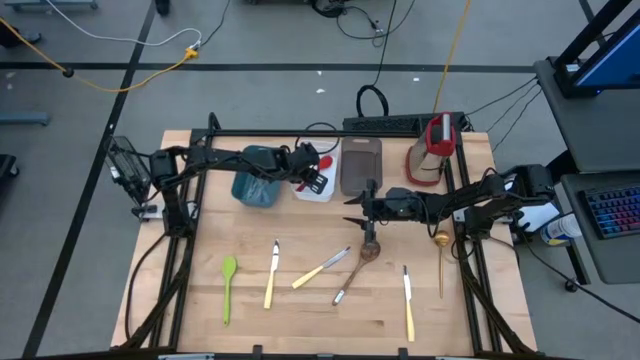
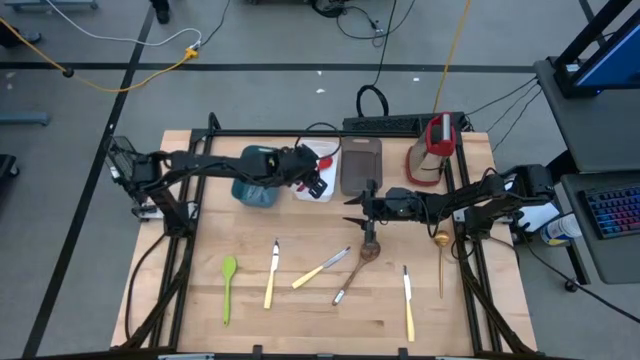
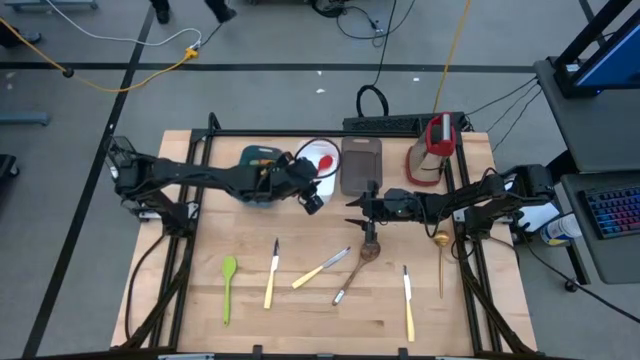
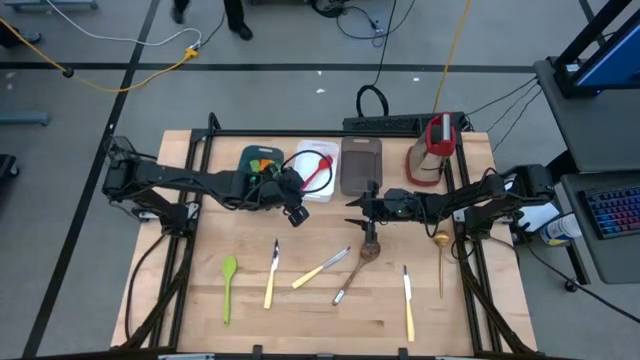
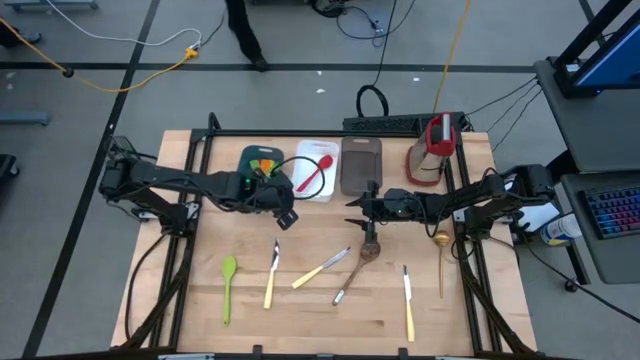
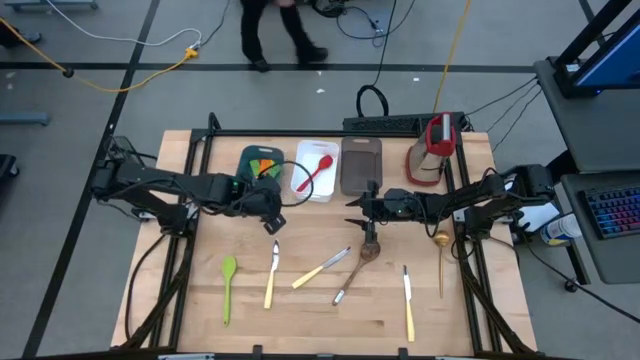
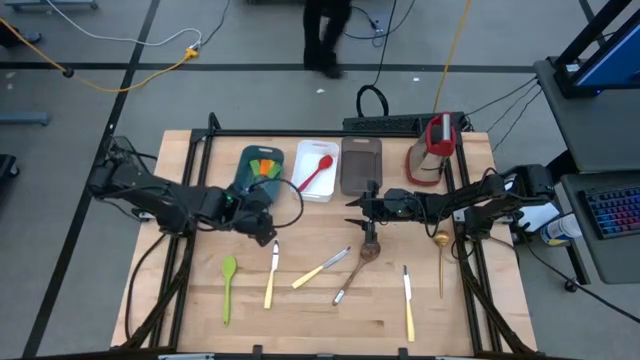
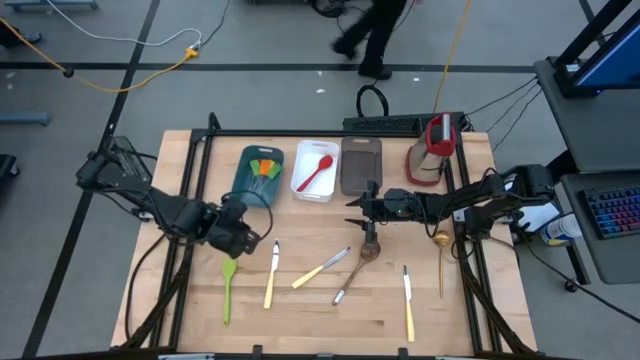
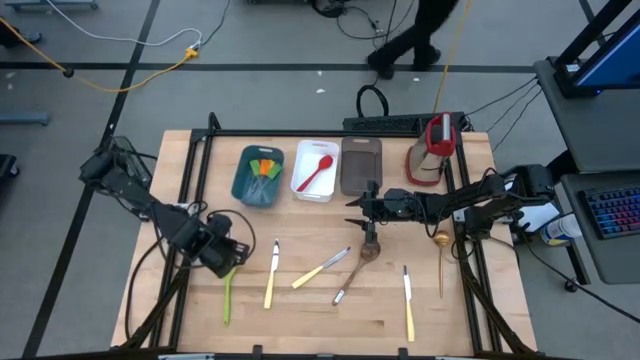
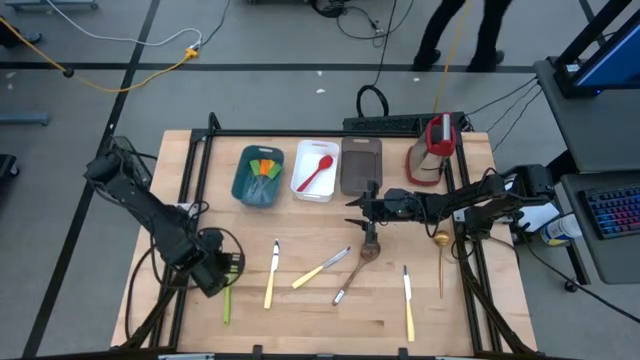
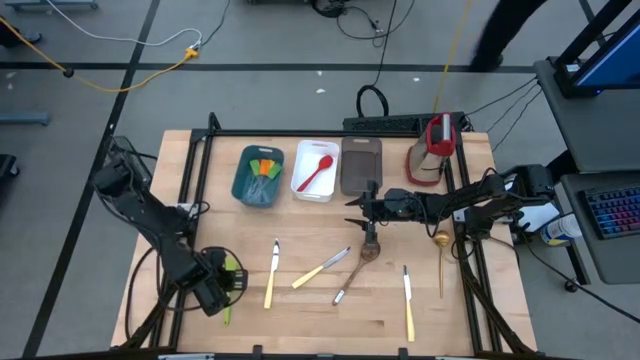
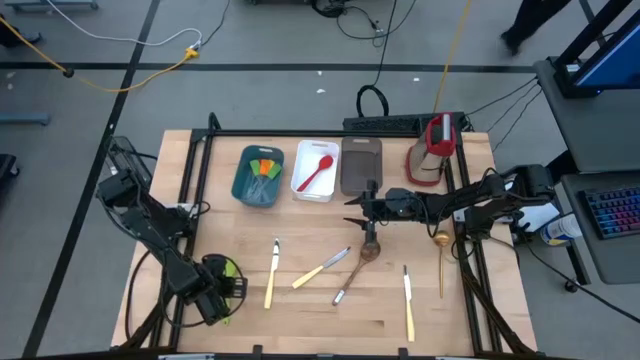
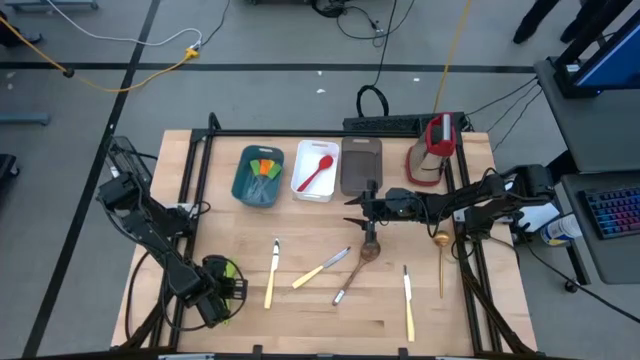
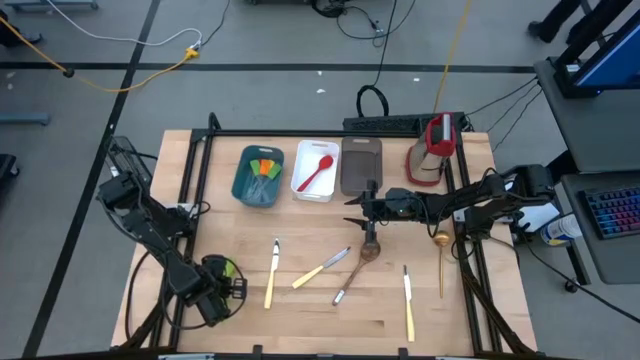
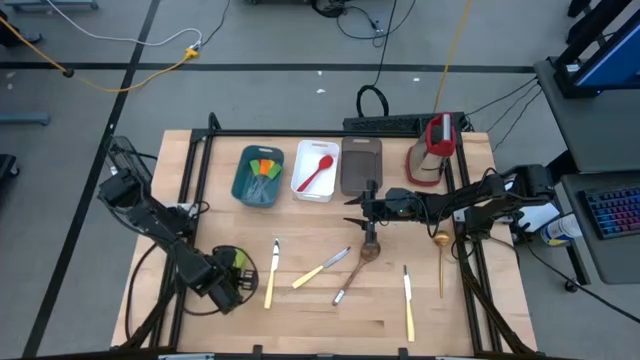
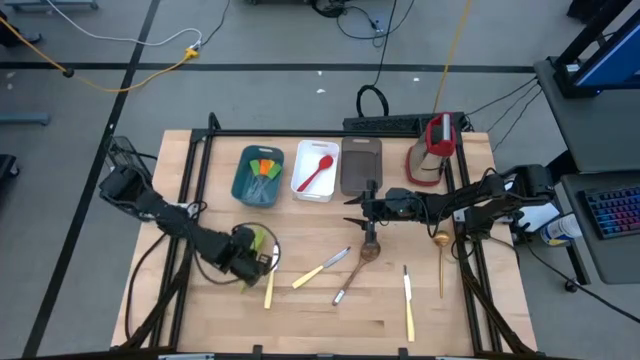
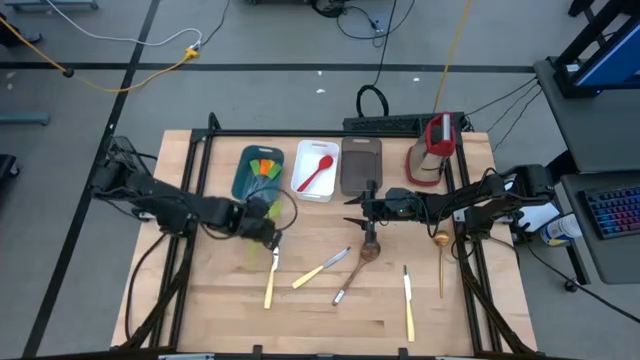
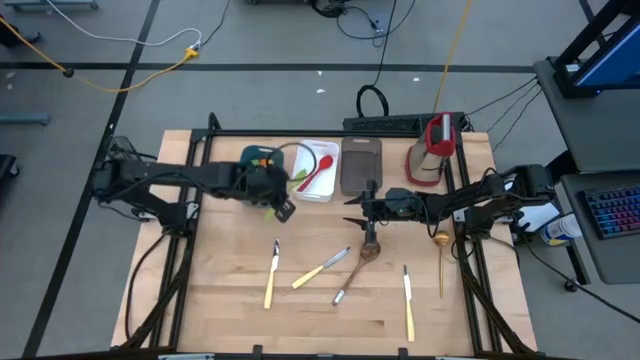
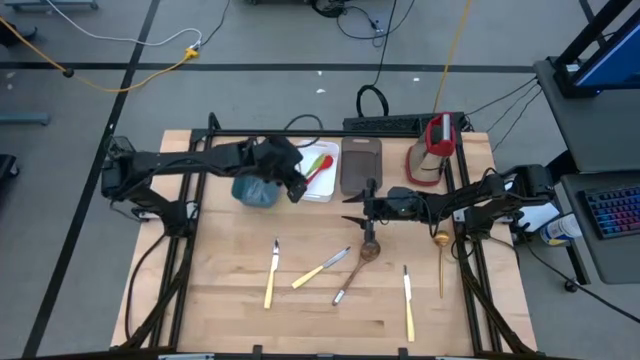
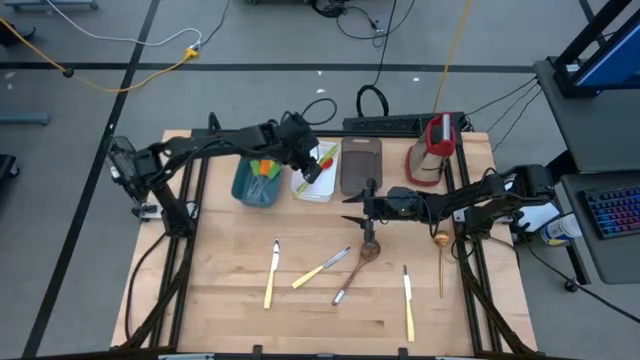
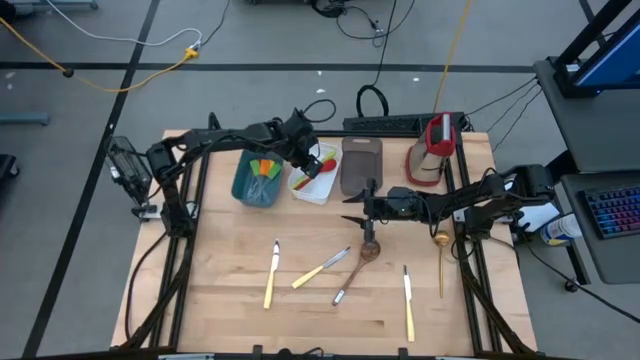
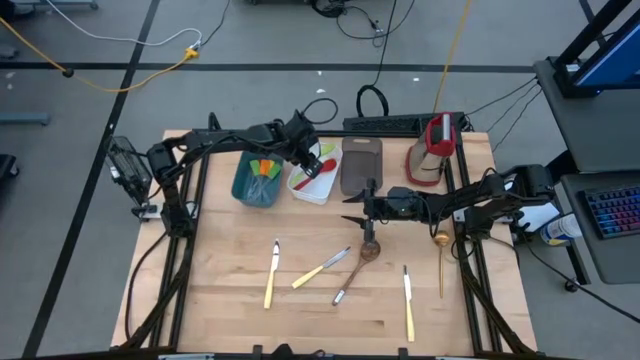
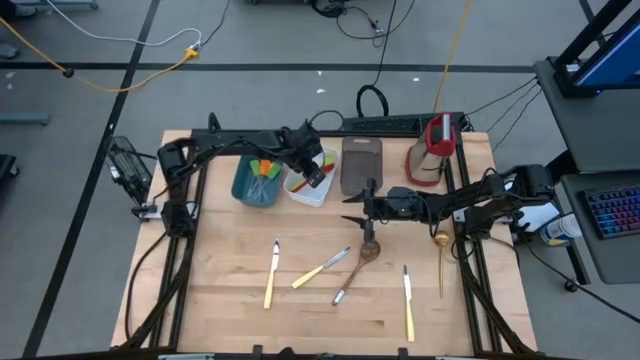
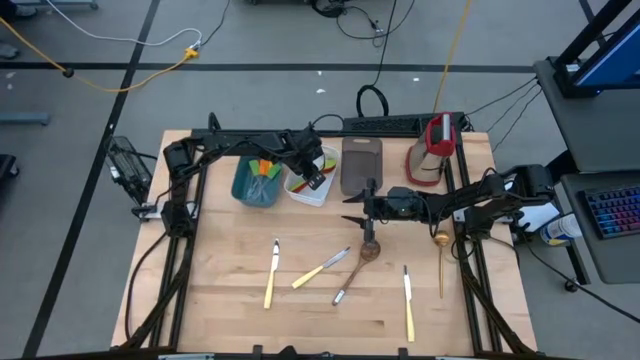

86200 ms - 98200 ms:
Task: Pick & Place Kitchen Items
Put the green serving spoon into the white bin

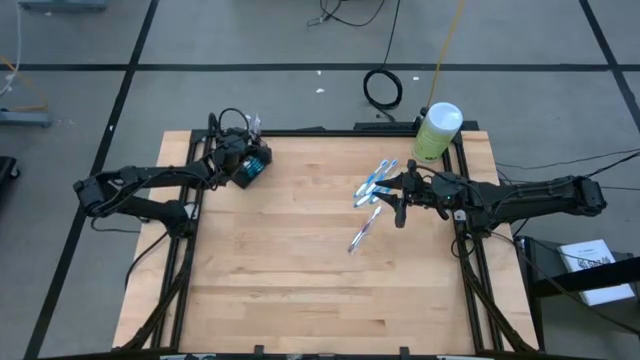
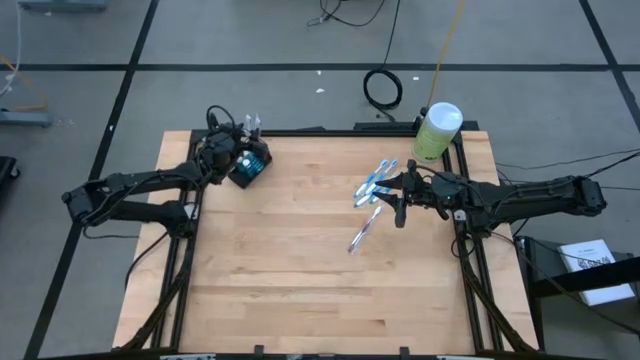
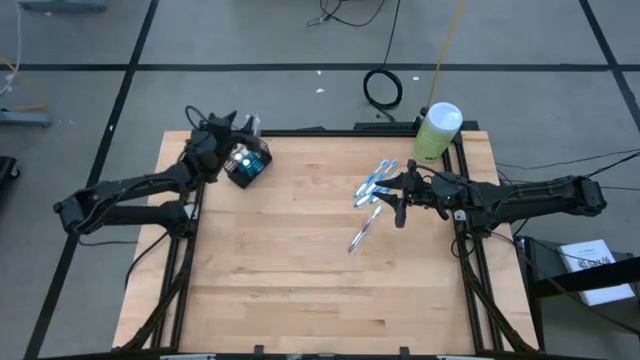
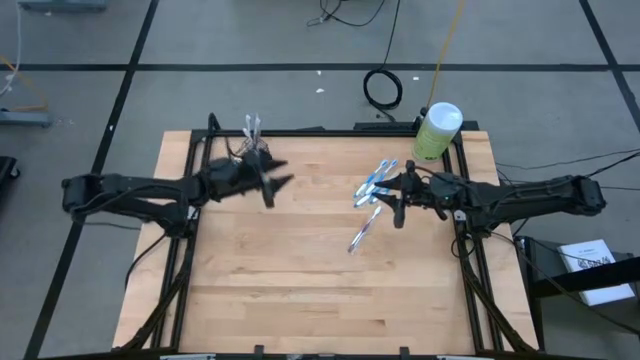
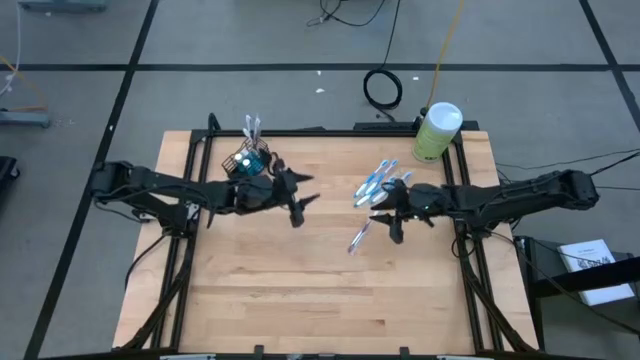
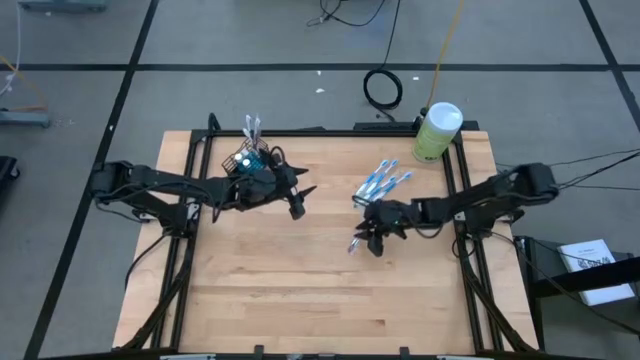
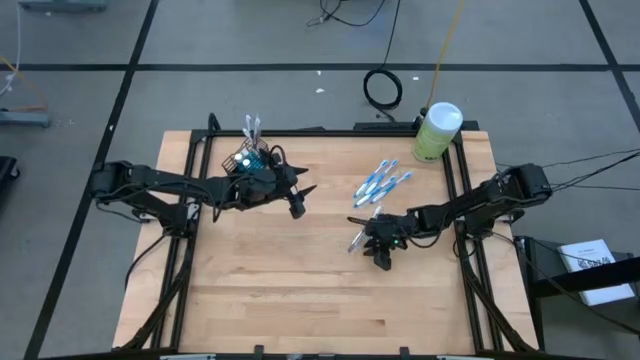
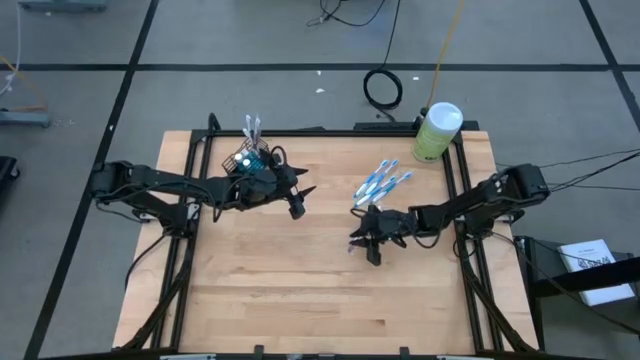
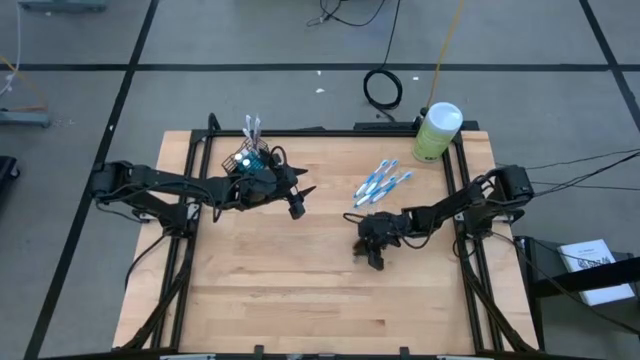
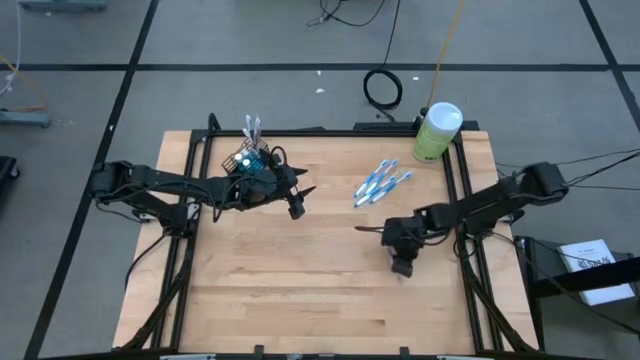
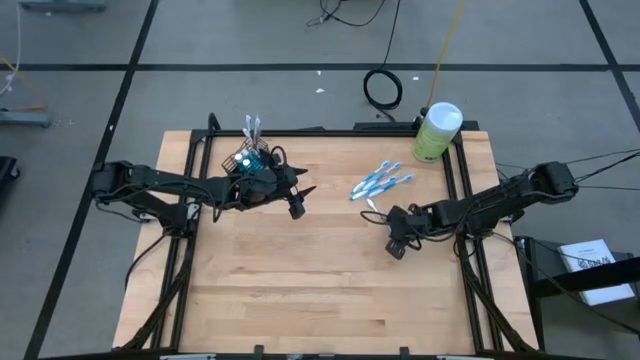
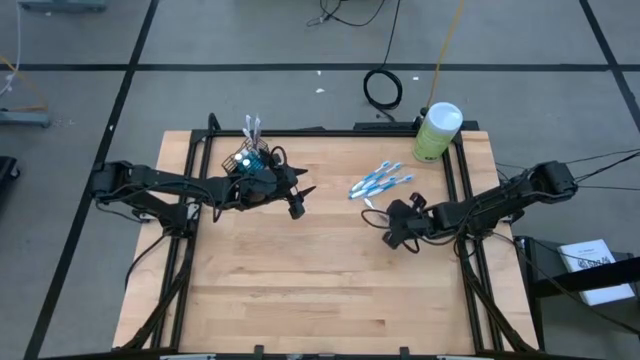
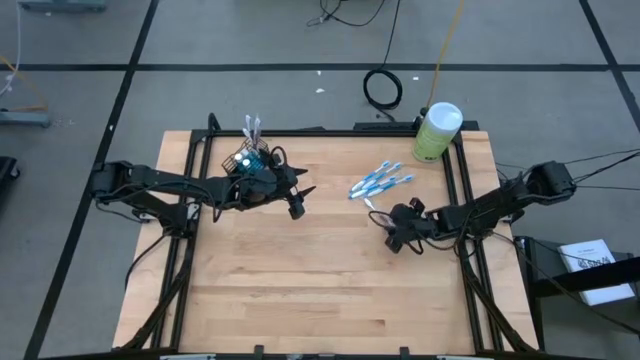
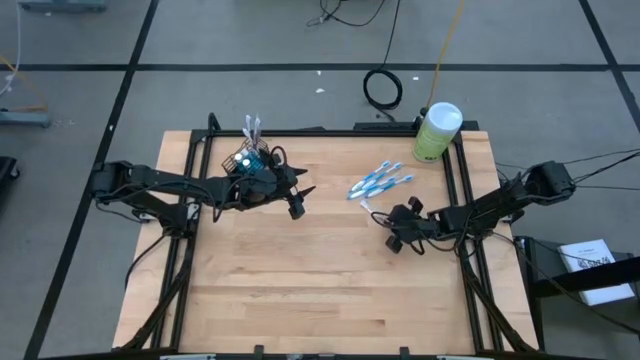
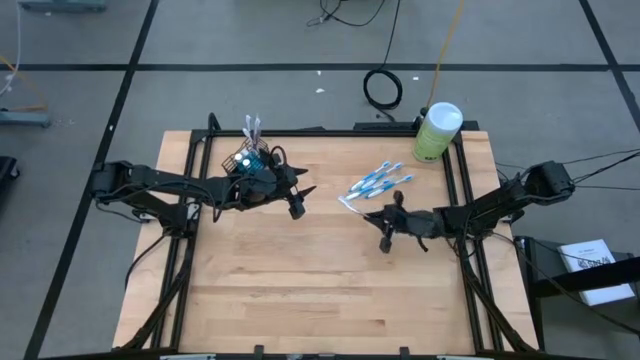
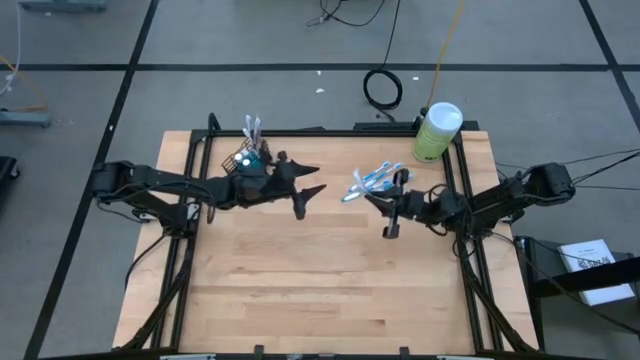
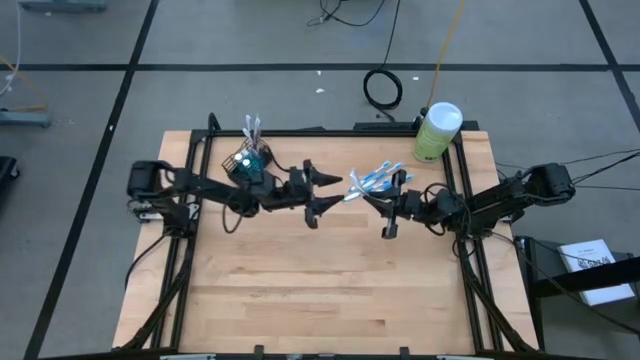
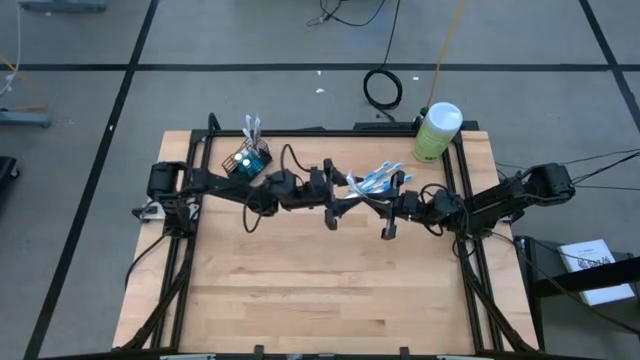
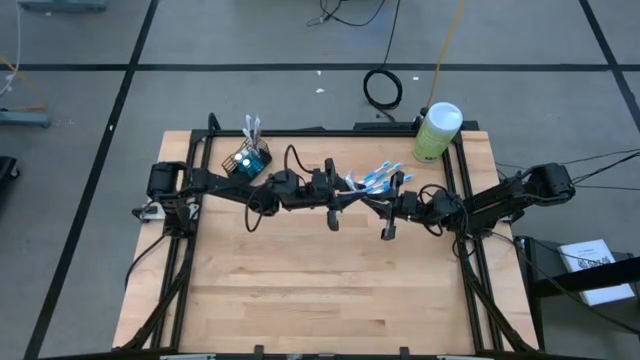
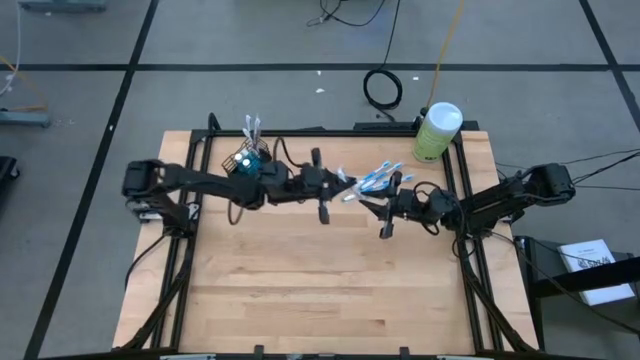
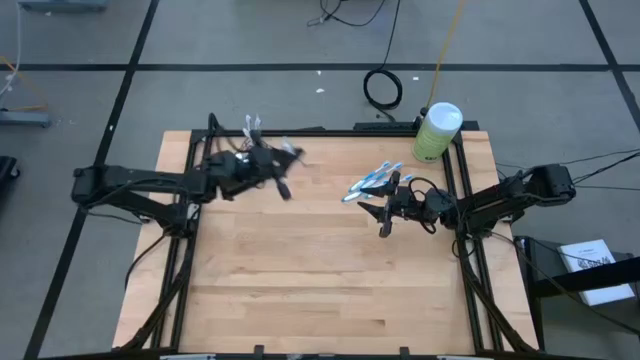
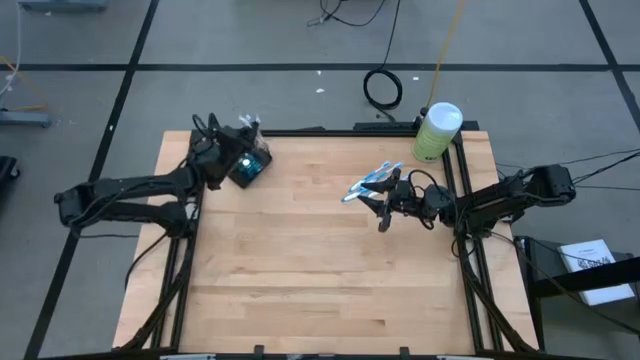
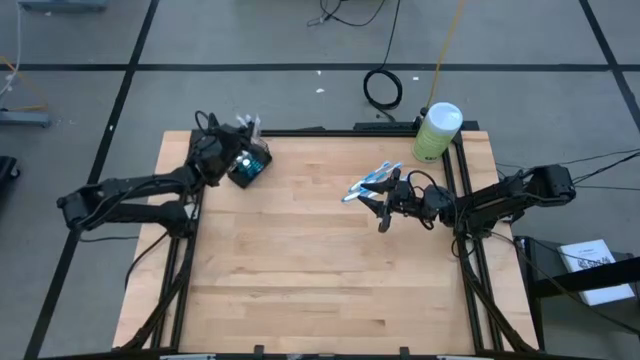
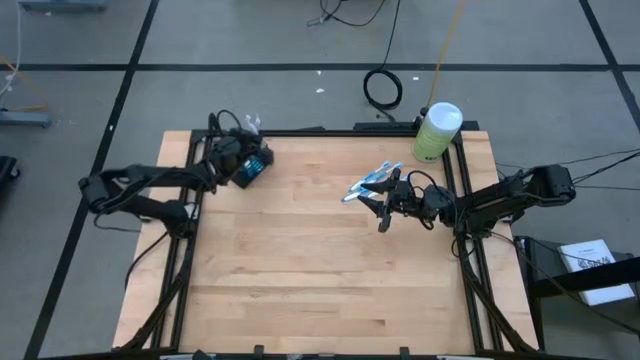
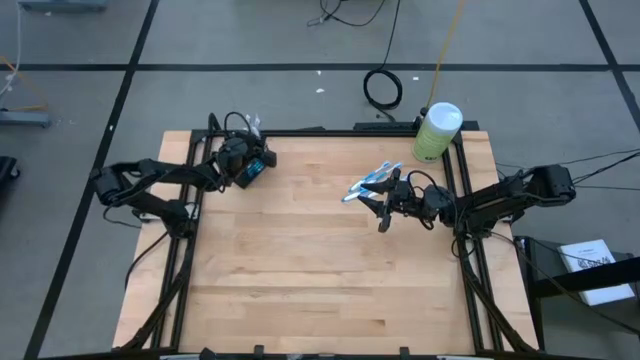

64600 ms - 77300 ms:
Task: Pick & Place toothbrushing station
Put the purple toothbrush into the right compartment of the wire organizer
